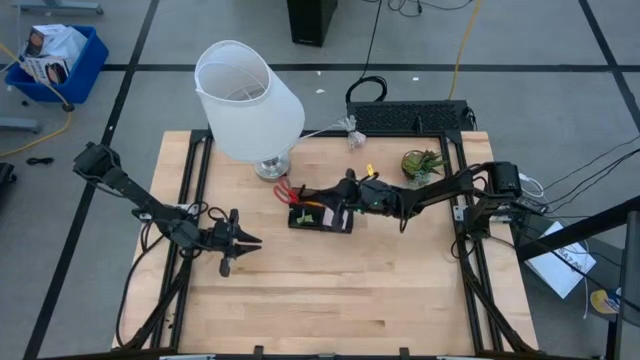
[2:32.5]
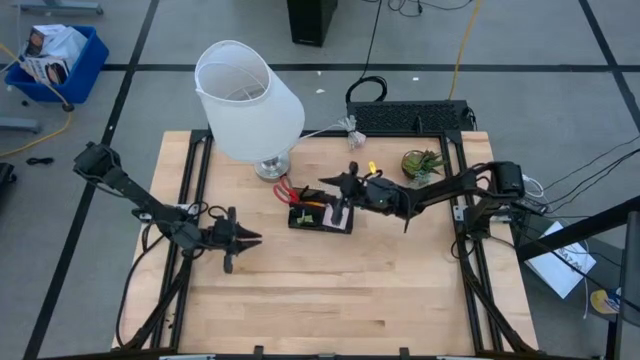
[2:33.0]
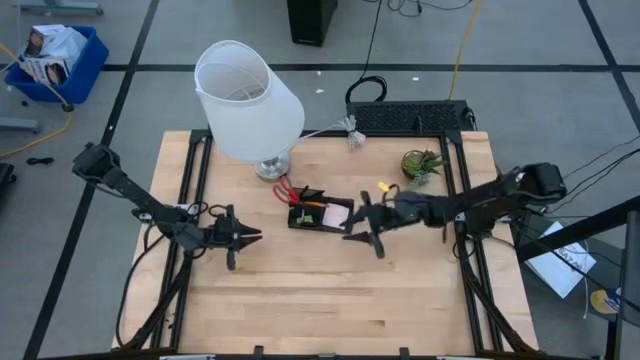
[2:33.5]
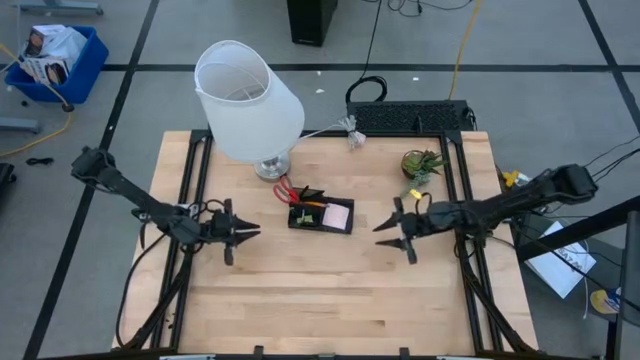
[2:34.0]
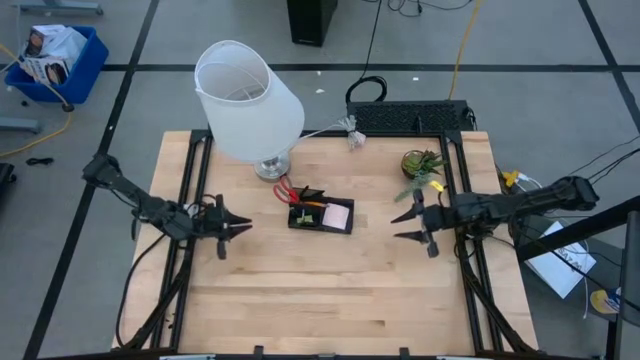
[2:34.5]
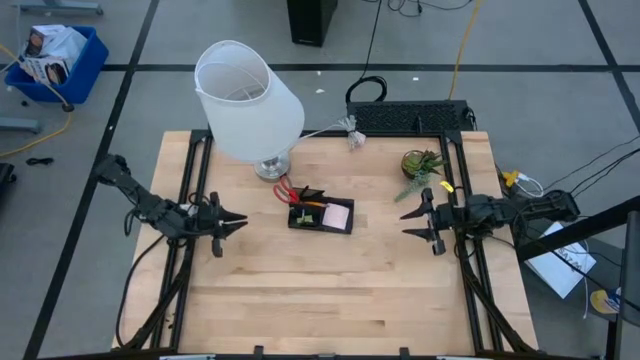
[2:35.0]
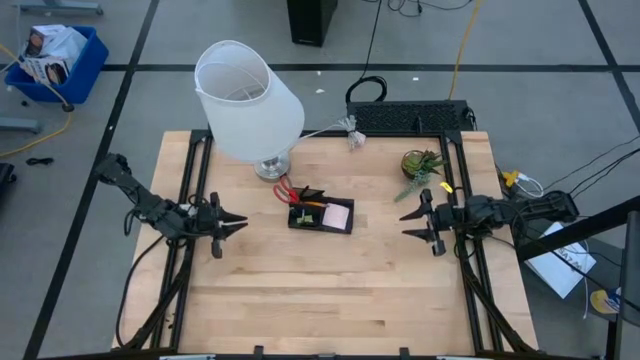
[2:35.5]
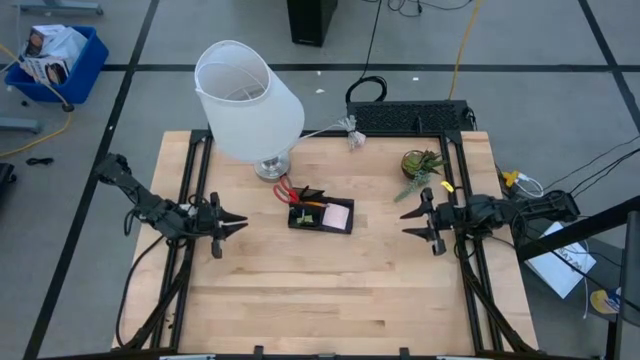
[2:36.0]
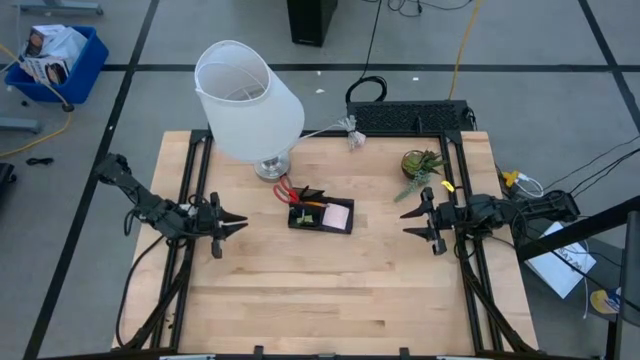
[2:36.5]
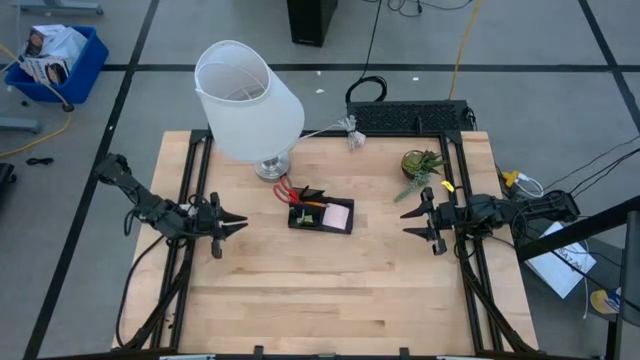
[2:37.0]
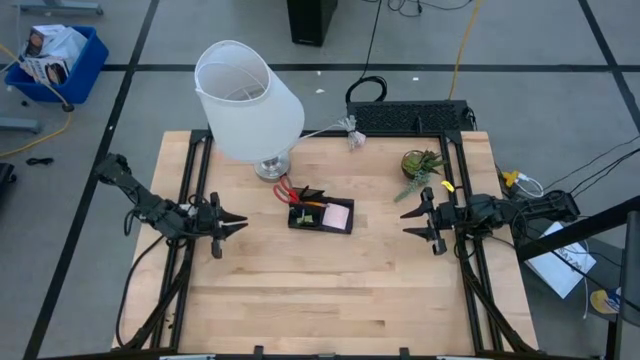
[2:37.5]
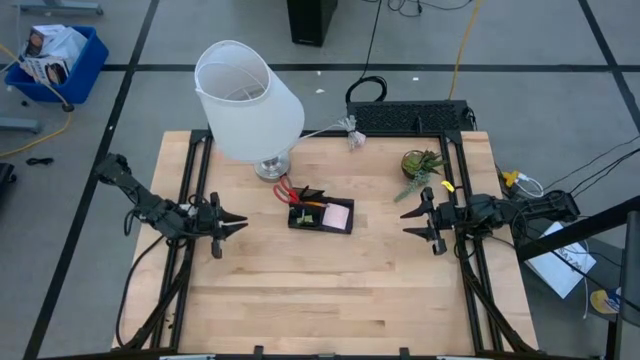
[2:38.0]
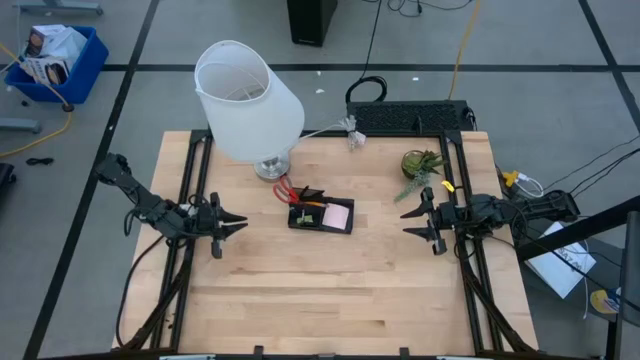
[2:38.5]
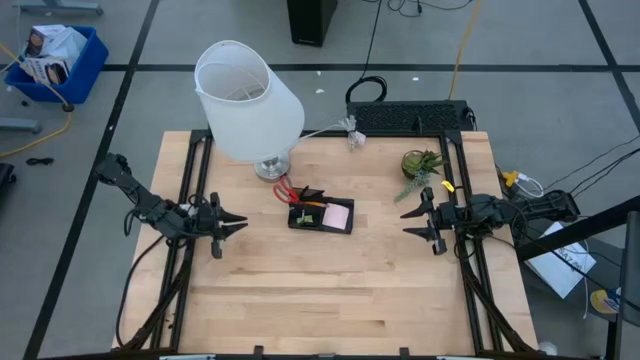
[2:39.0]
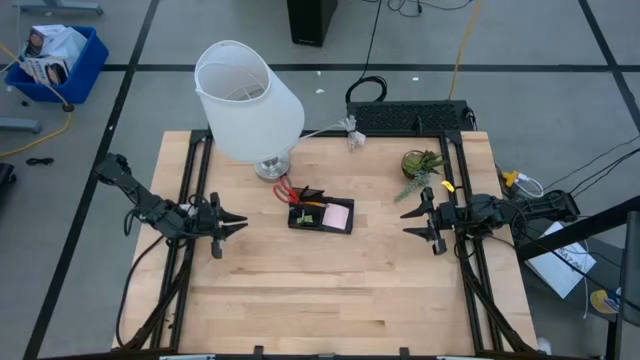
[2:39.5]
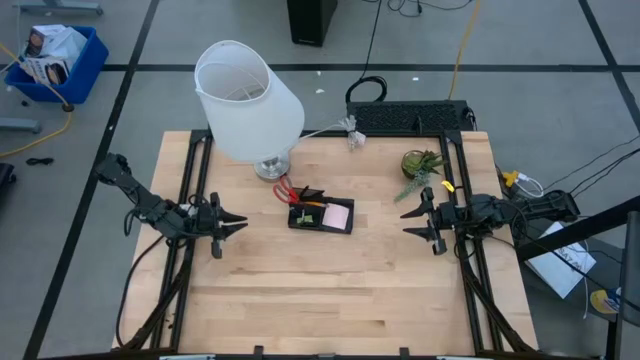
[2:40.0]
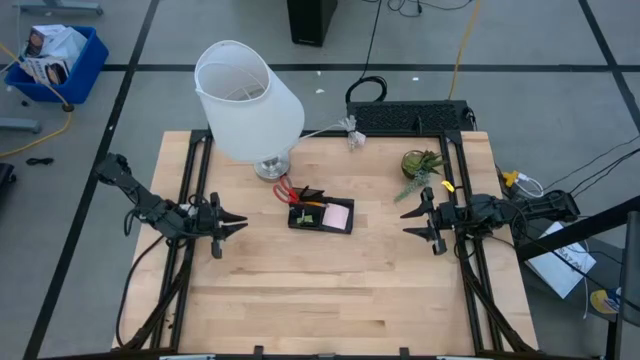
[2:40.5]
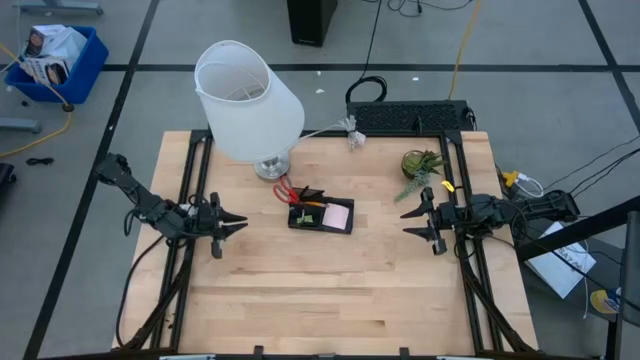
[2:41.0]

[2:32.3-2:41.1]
Task: Pick and place office supplies into organizer
Return to Home Position

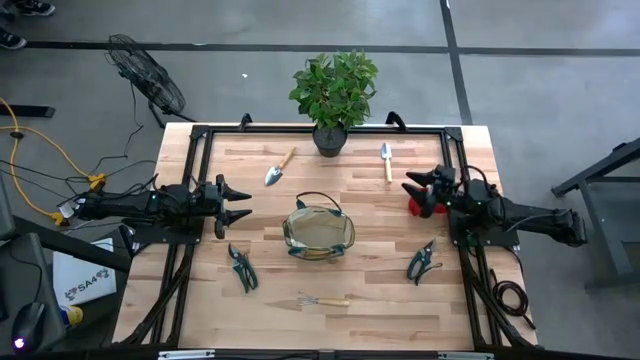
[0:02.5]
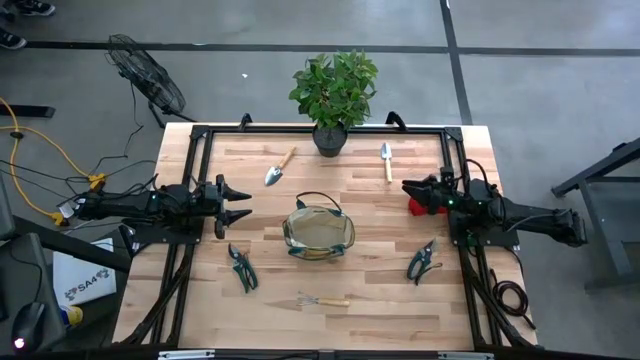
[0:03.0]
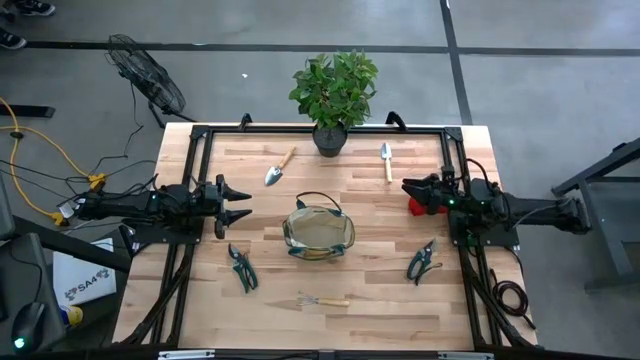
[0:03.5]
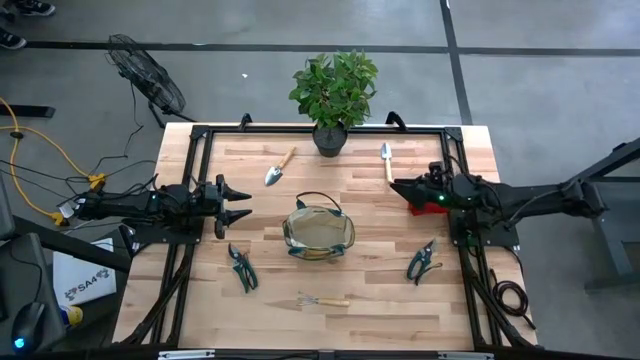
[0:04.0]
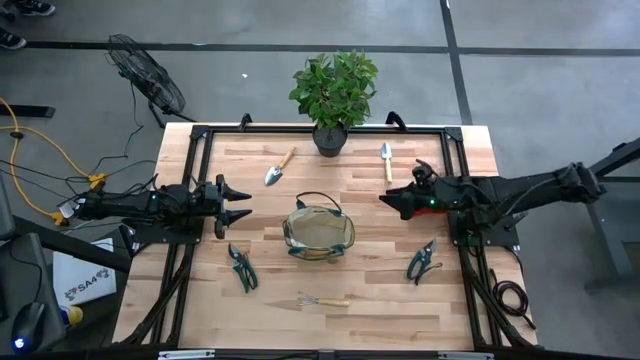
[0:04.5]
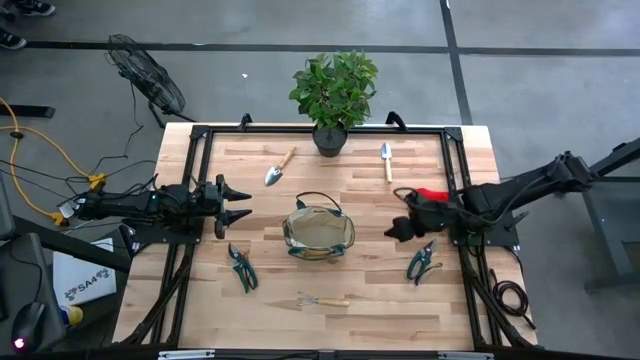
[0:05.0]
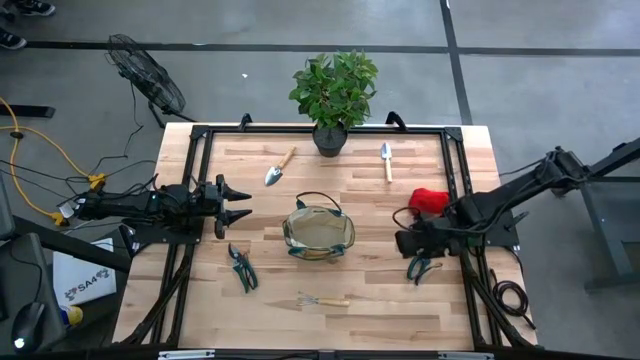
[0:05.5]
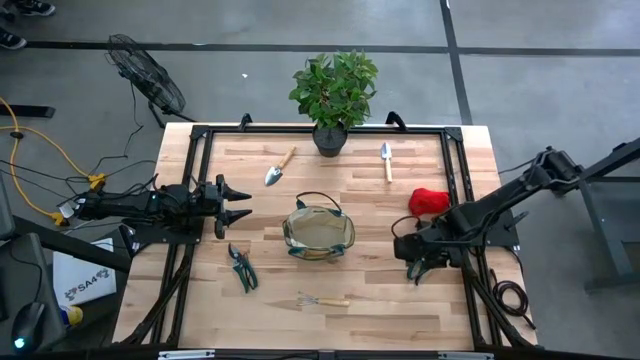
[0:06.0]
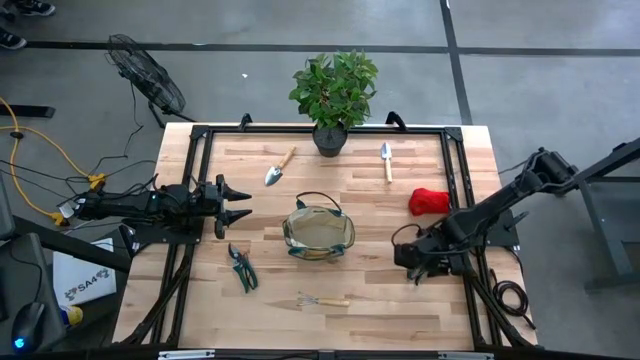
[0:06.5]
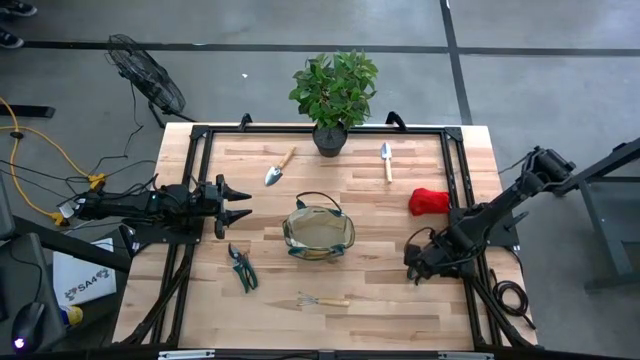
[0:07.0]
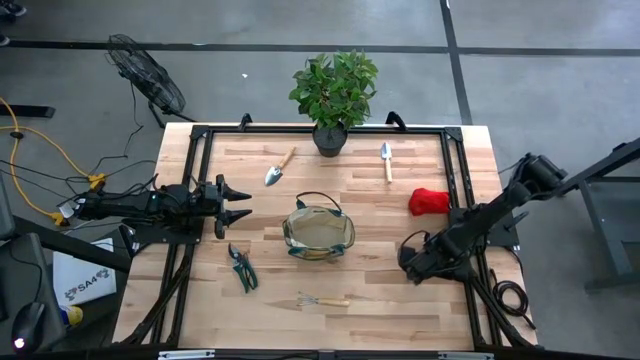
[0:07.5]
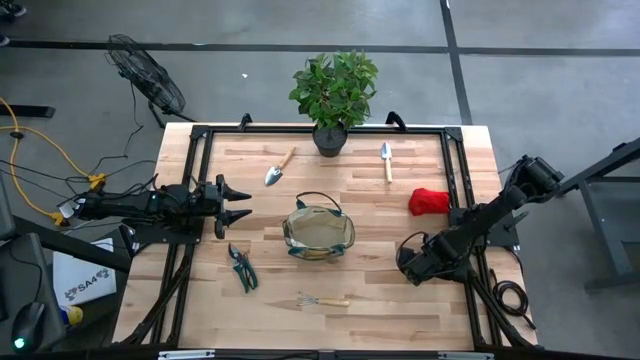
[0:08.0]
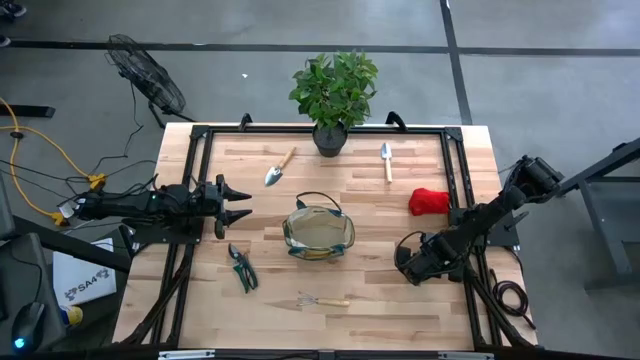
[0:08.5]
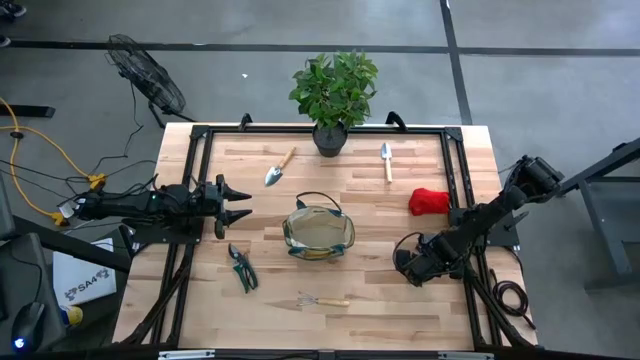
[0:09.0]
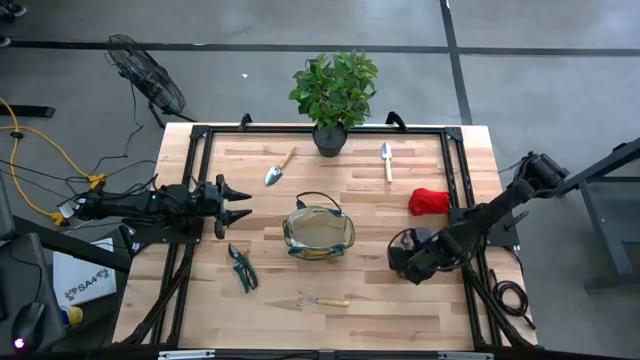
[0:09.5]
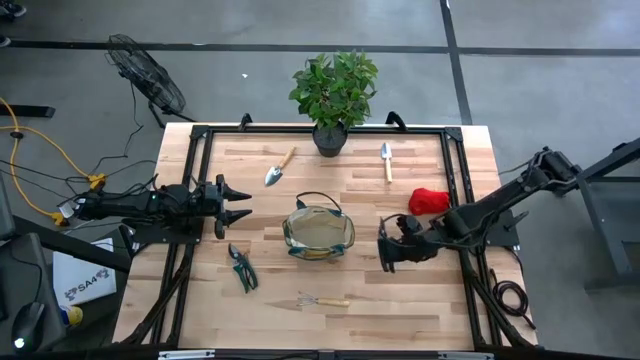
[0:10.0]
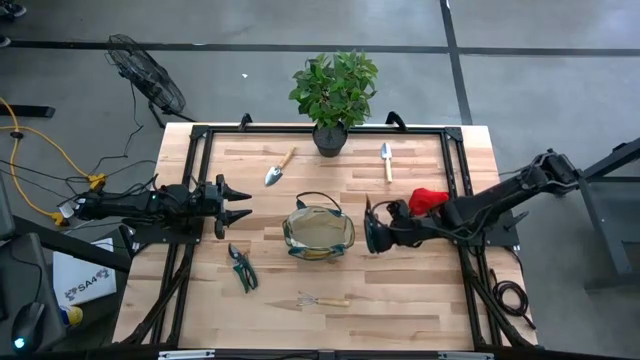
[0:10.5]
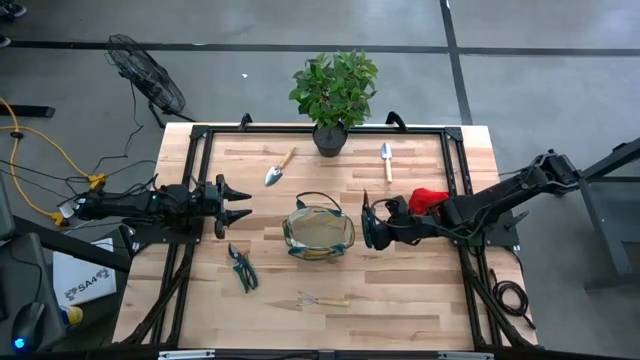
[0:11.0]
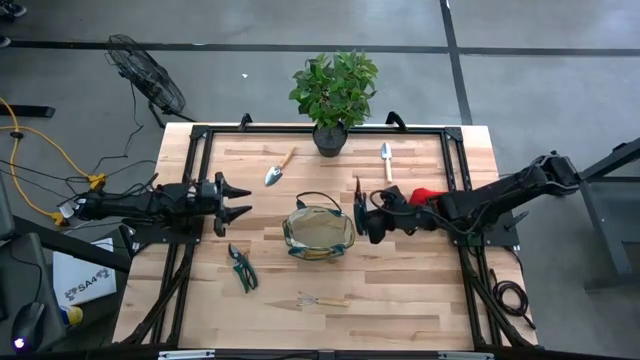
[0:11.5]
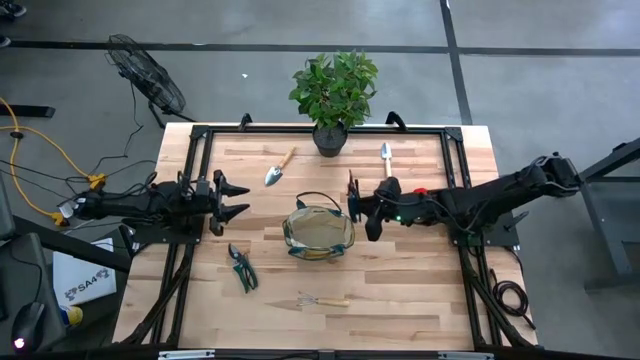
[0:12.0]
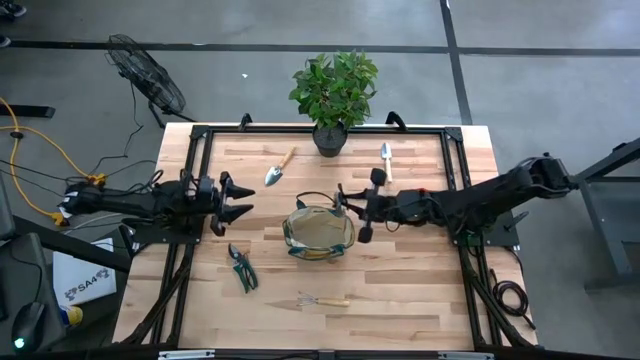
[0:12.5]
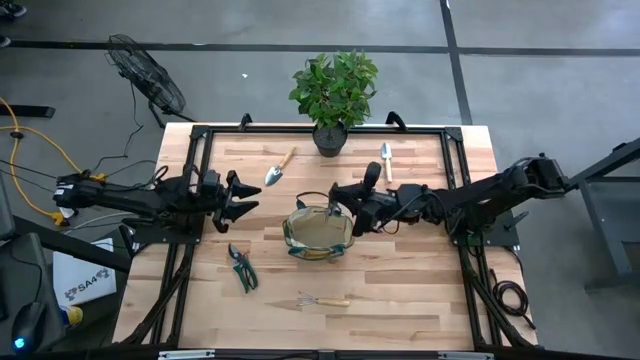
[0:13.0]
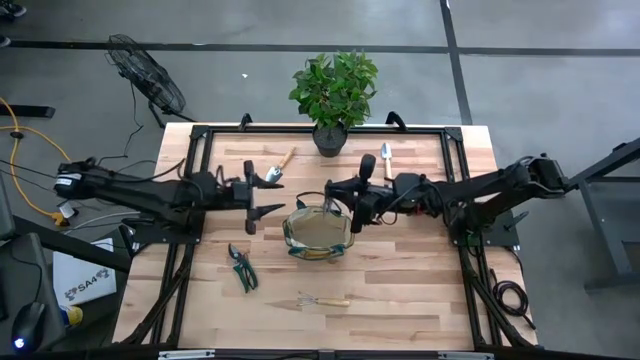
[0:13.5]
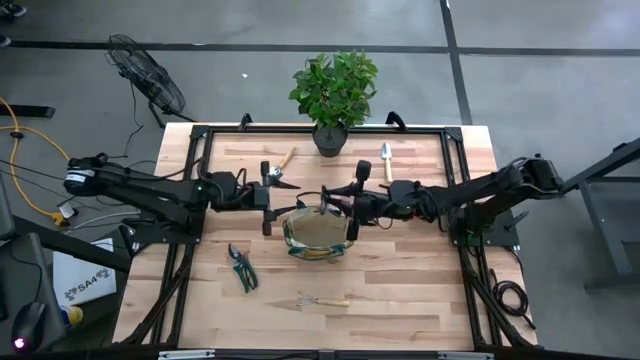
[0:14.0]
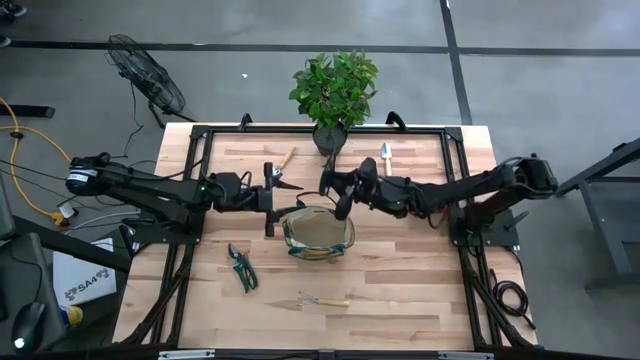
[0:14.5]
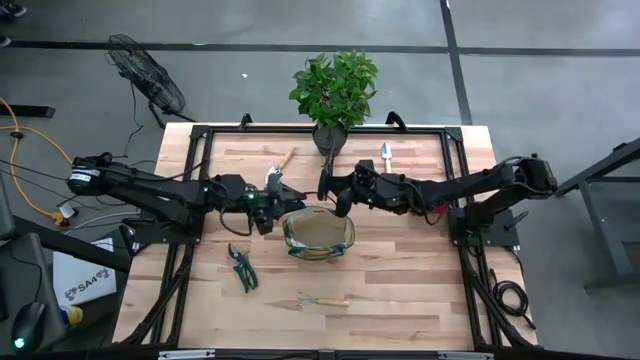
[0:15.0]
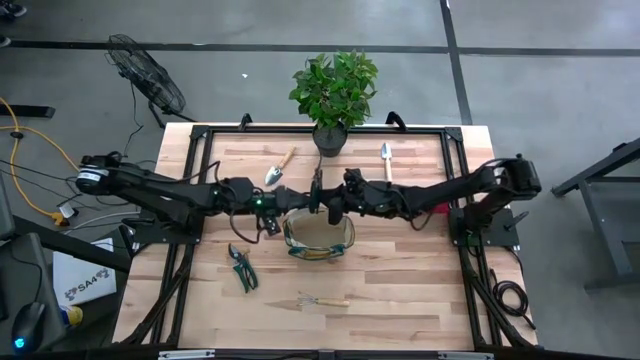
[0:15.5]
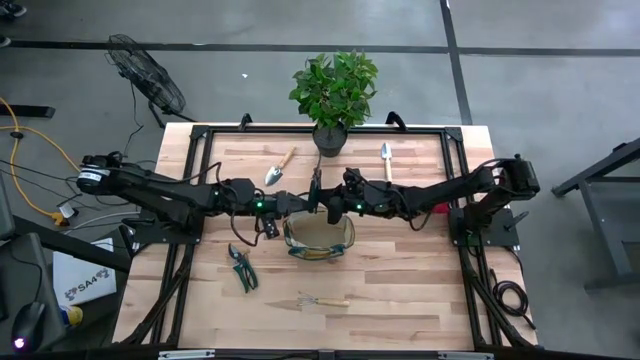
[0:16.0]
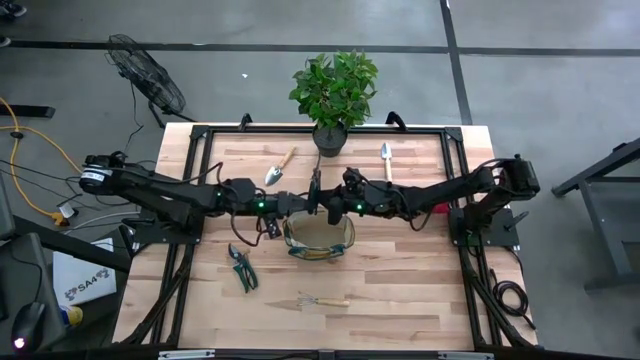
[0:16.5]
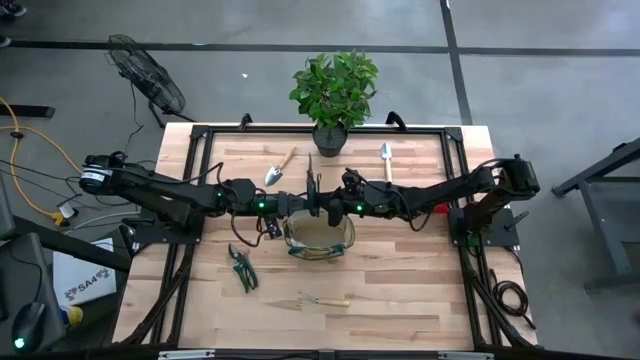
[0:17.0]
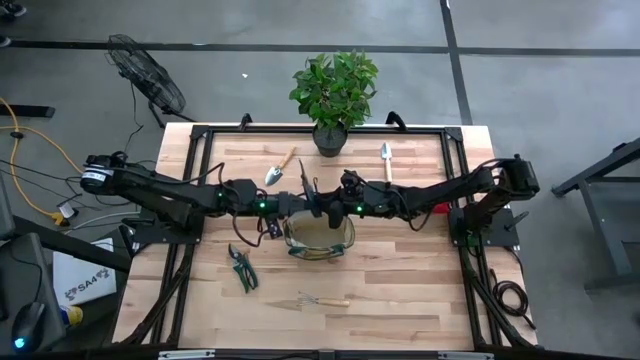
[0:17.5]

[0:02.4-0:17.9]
Task: Pick & Place Garden tools in Gardening bag
Put the right green shear scissors into the gardening bag
